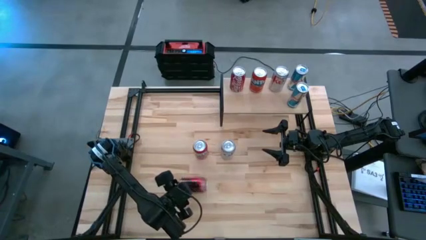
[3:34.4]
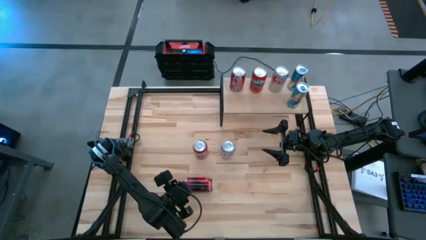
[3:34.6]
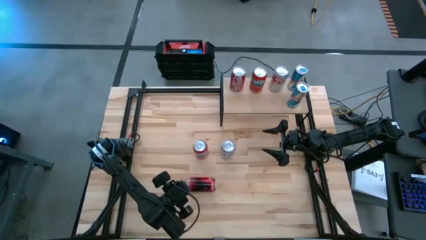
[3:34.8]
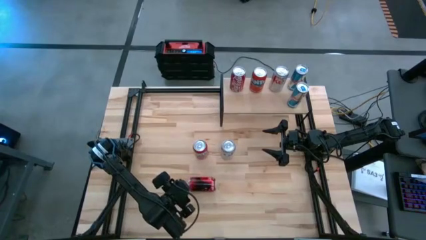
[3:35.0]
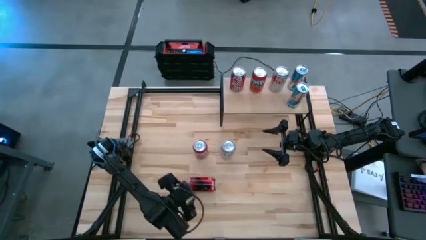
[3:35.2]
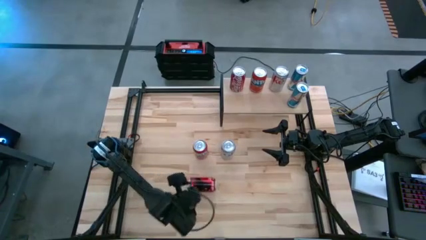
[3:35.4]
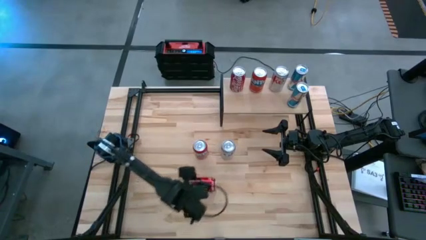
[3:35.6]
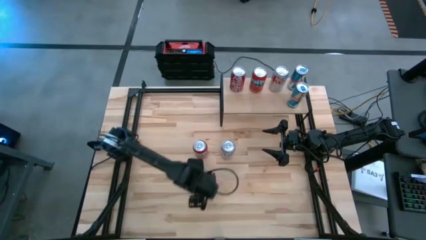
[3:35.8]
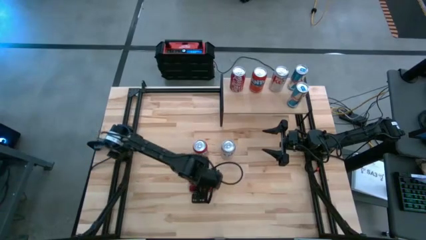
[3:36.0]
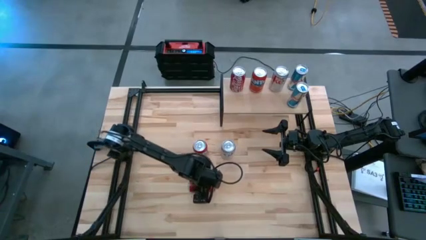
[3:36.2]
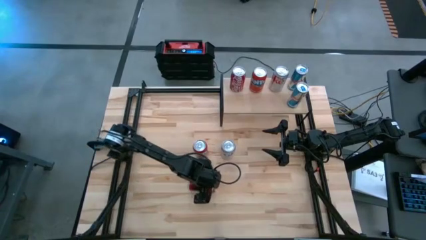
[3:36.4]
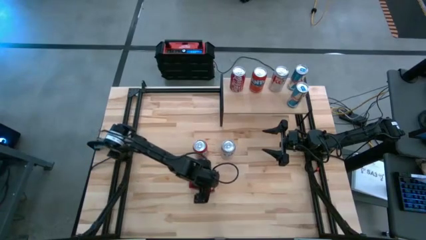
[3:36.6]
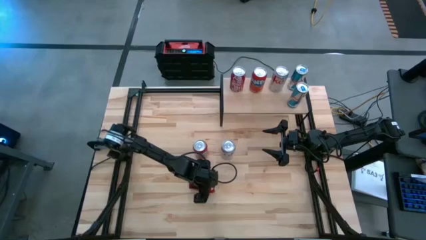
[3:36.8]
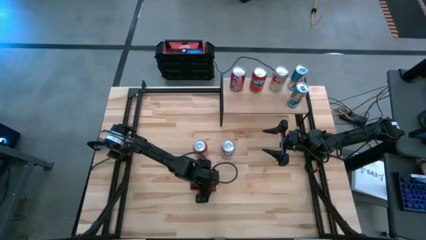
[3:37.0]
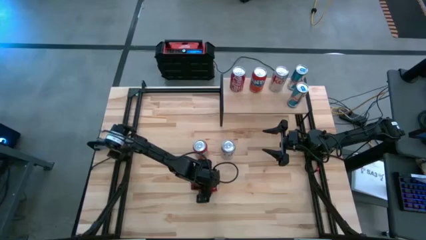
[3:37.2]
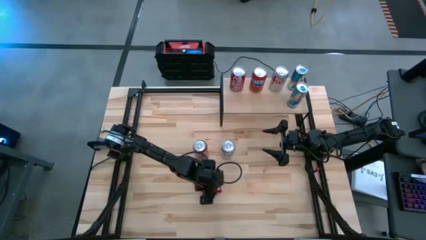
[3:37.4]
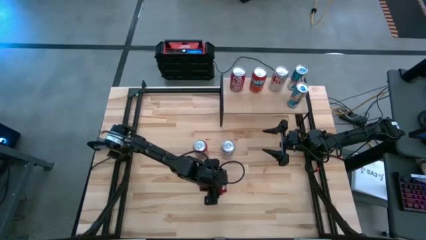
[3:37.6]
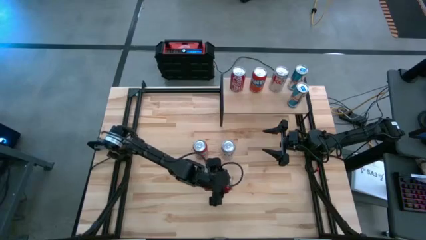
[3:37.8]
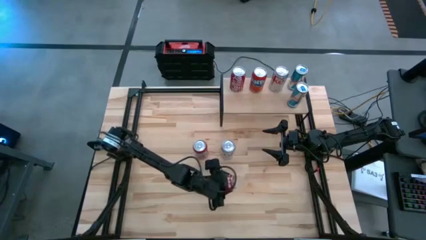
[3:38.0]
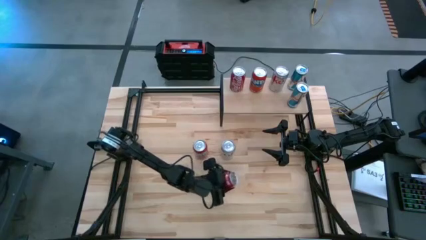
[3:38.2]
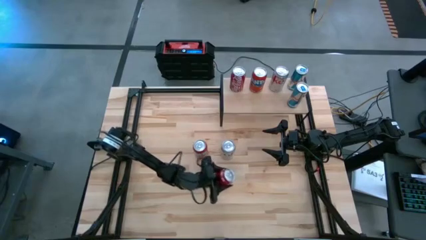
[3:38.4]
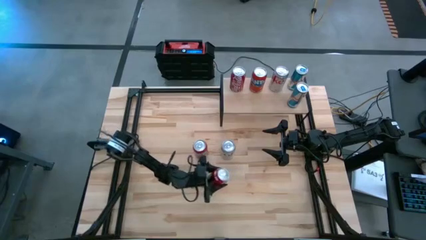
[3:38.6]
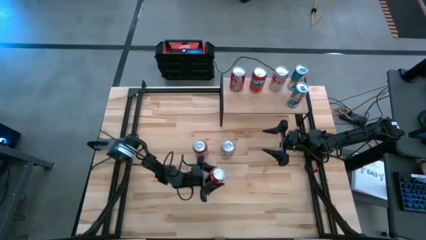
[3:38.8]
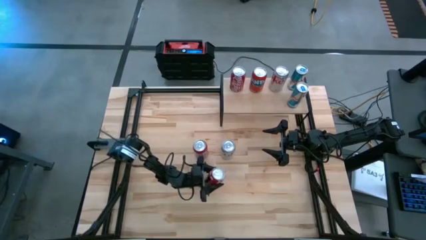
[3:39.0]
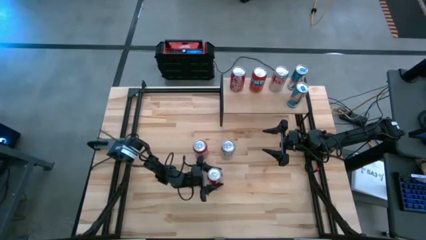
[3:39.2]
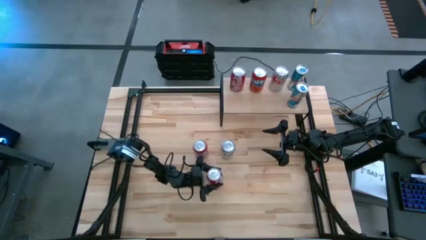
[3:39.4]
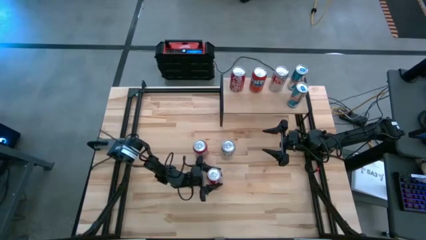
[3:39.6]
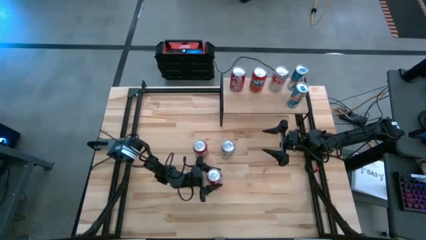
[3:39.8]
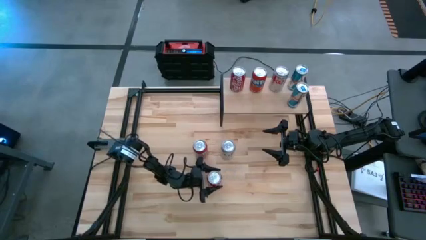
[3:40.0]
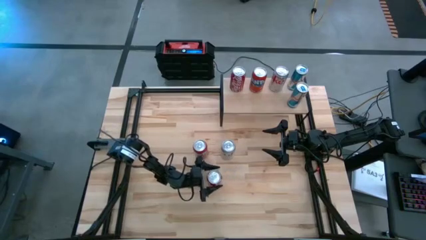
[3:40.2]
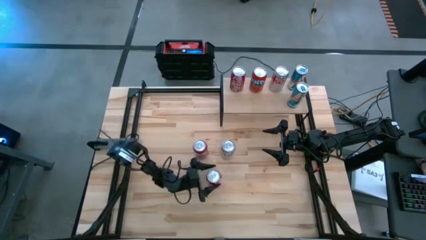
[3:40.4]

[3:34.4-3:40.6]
Task: Place canned beverage on shelf
Move the red white soda can to the bottom right of the red soda can

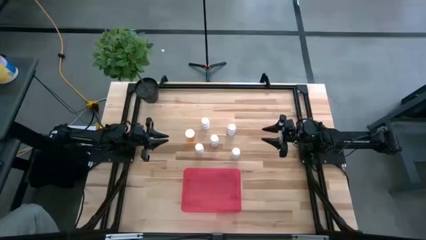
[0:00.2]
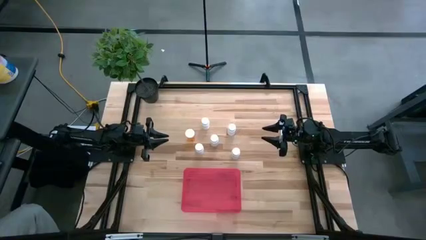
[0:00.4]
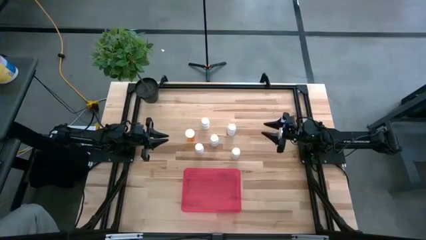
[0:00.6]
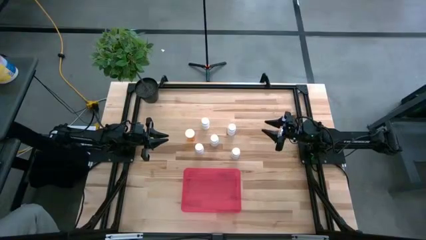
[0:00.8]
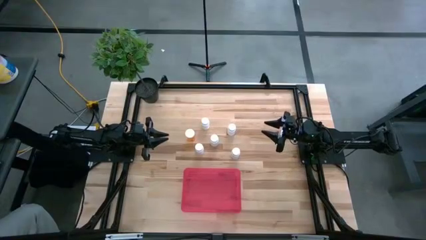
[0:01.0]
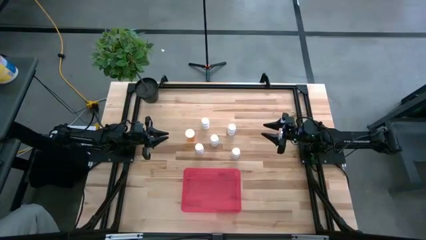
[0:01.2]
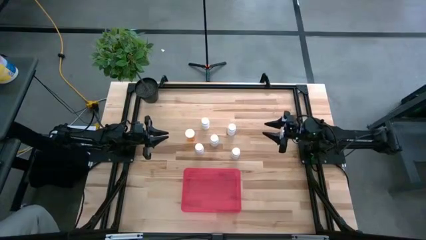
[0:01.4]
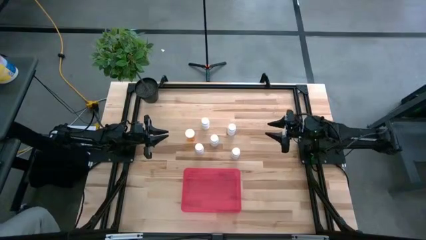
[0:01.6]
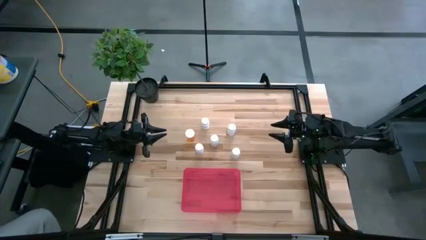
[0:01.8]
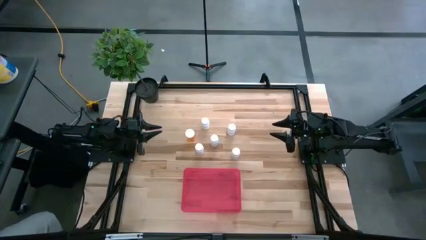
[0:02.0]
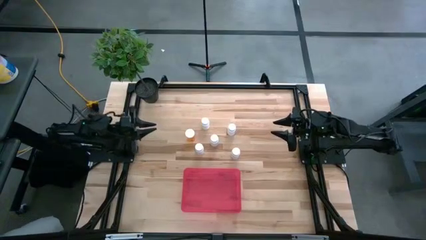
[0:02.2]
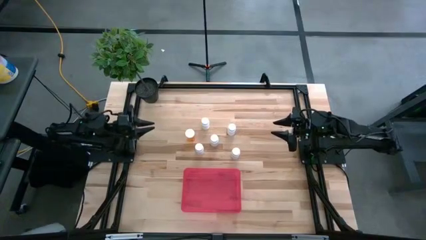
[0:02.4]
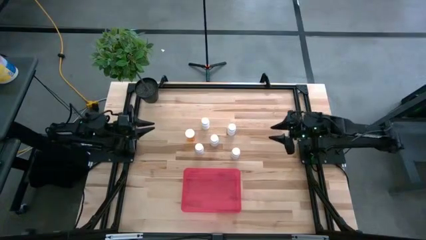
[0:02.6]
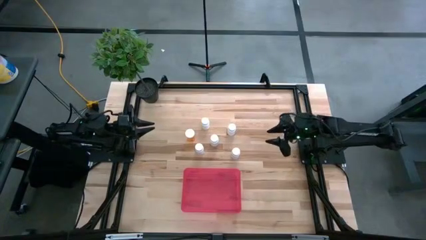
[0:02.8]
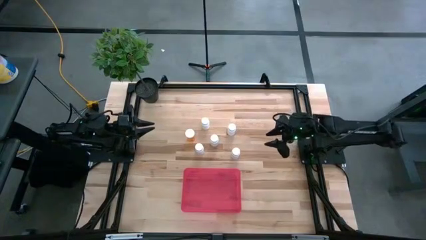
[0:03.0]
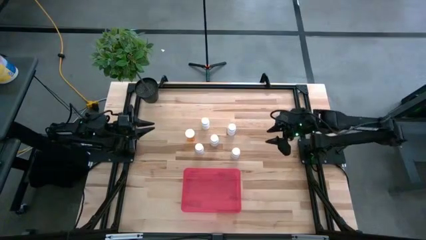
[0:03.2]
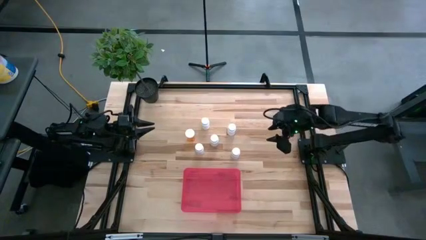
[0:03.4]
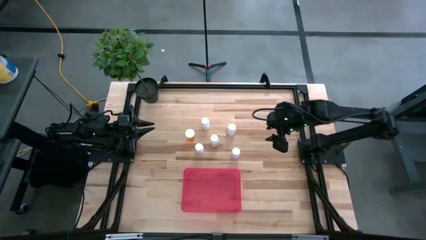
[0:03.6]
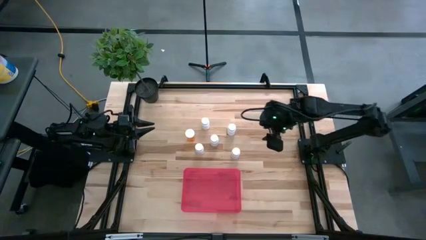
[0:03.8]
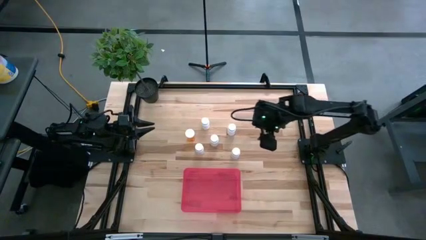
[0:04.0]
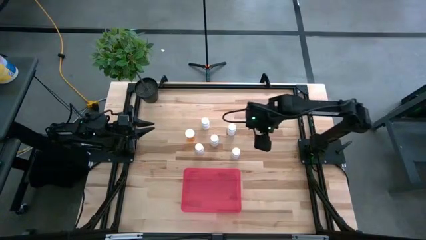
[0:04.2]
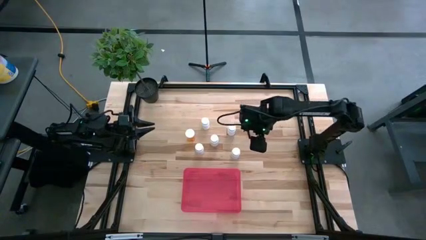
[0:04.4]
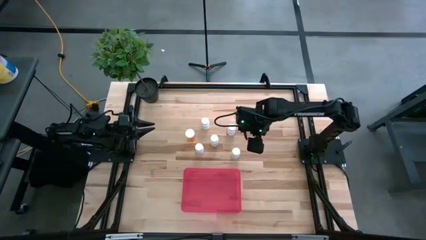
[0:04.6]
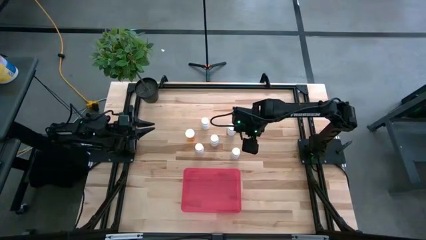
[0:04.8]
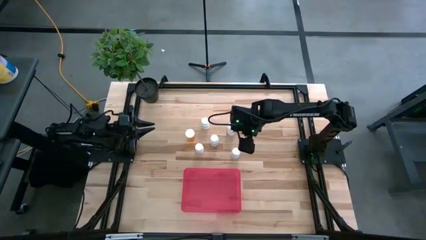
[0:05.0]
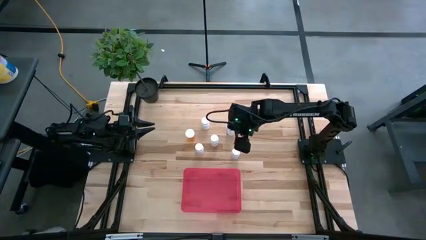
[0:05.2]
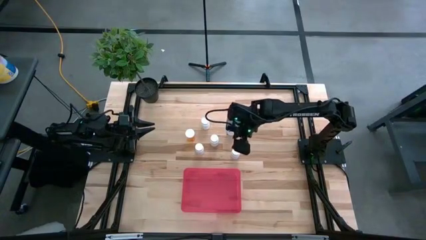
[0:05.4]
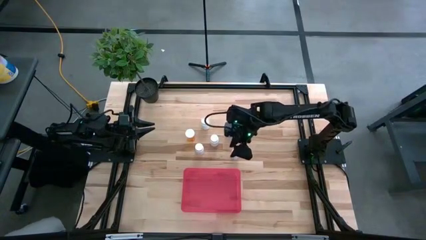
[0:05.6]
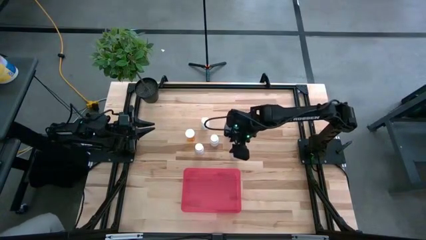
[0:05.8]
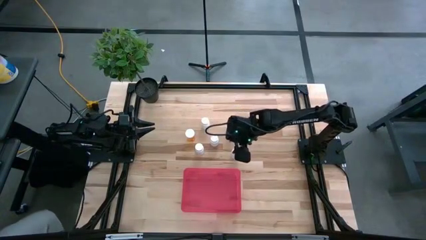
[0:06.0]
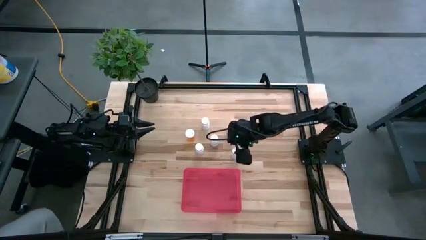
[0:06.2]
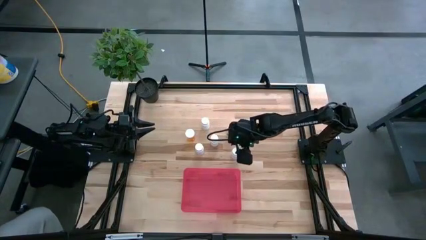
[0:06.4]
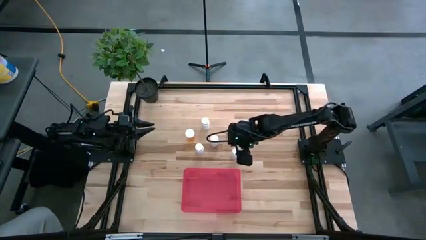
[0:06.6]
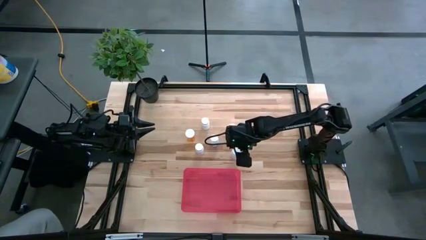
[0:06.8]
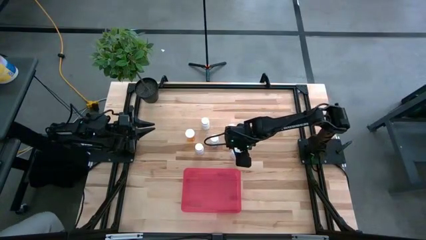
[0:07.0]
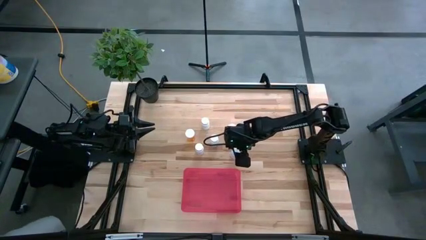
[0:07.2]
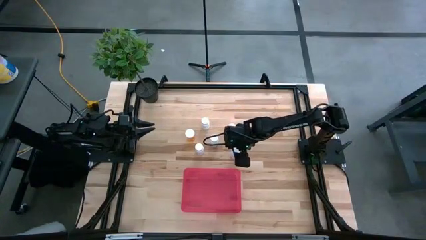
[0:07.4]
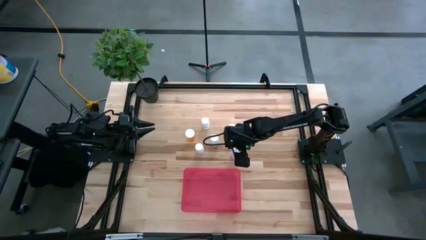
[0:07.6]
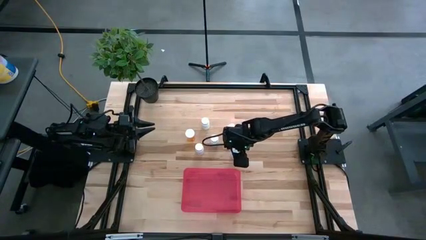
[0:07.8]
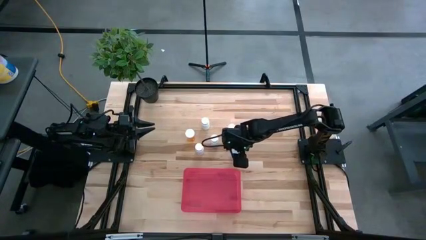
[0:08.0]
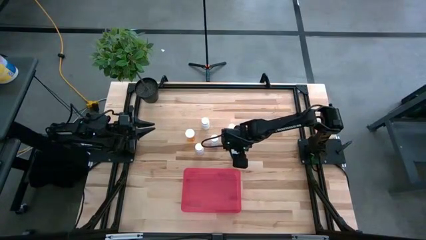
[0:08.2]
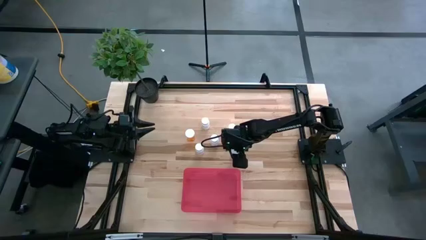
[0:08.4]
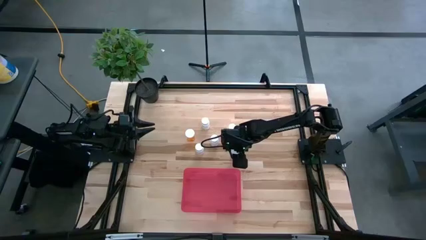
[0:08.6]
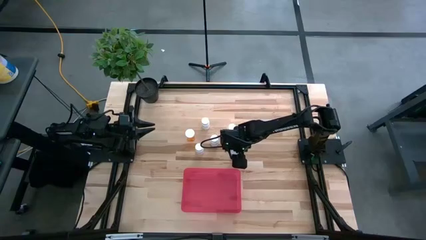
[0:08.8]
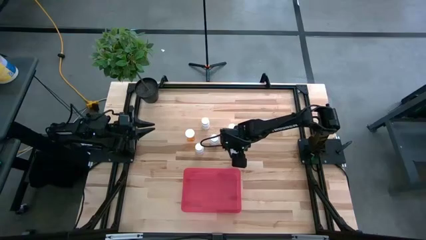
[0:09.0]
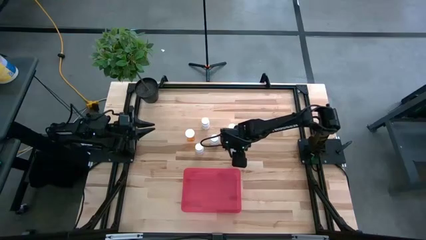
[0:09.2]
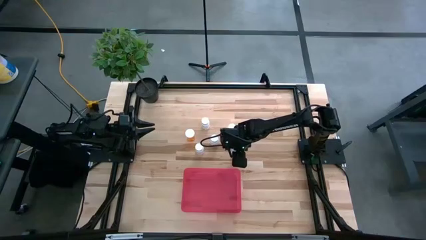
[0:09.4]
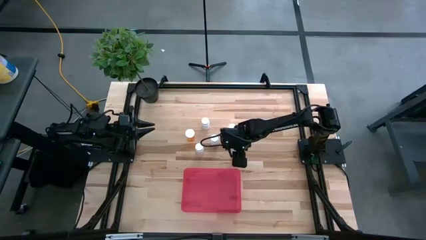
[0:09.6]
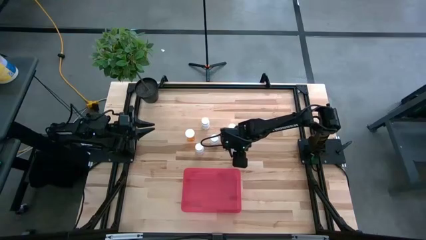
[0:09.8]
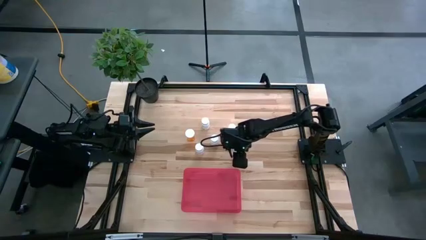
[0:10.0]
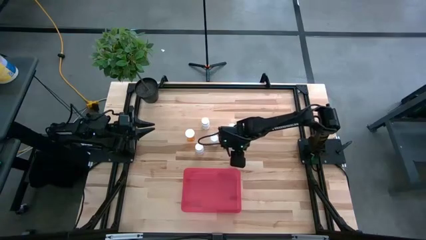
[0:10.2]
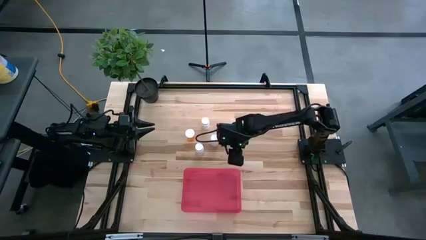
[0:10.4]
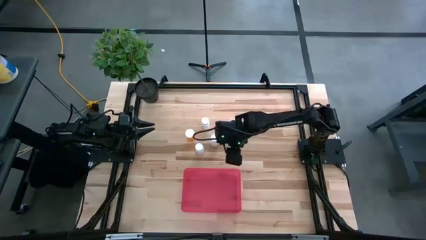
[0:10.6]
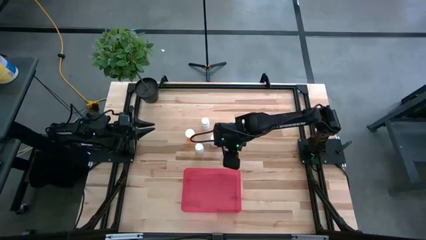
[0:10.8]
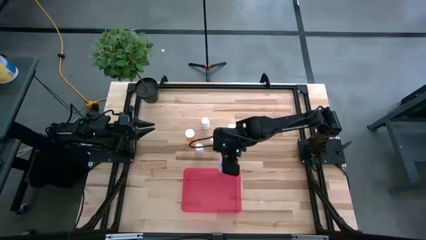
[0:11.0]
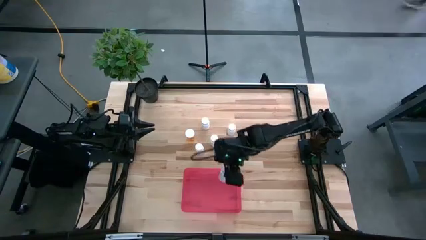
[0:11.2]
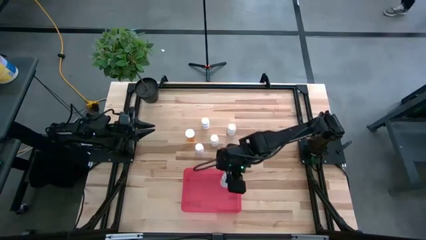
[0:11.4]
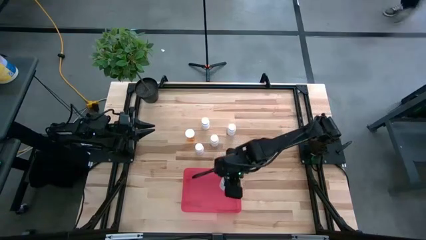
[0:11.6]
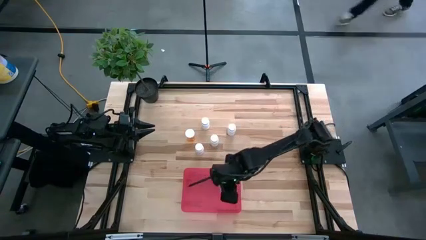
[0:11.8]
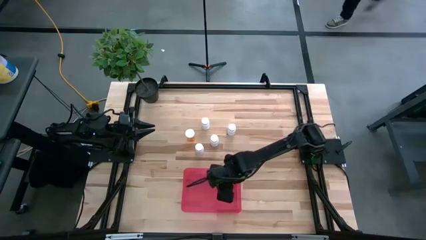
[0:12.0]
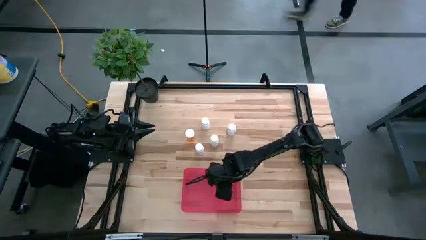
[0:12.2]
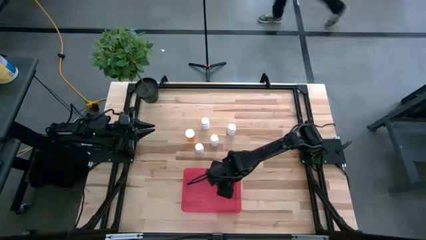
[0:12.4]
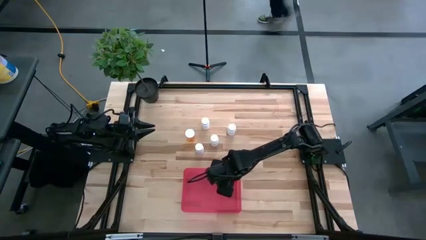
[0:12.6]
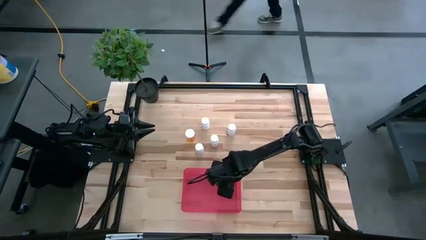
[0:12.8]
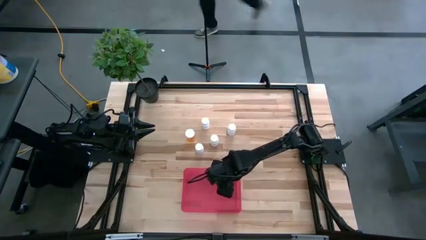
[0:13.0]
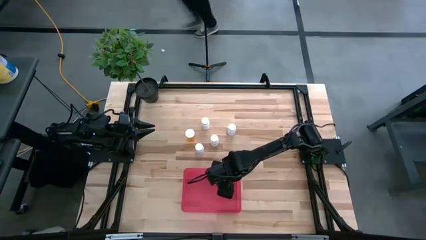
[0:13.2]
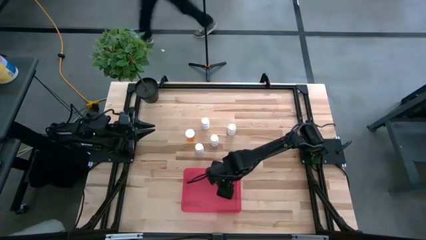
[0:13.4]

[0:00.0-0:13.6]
Task: Pick and place pill bottles into a basket
Put the white pill bottle into the bin
